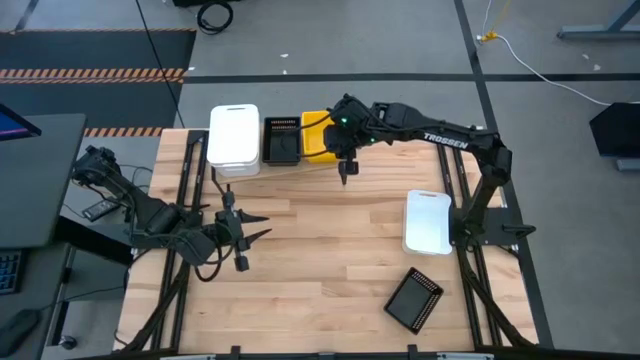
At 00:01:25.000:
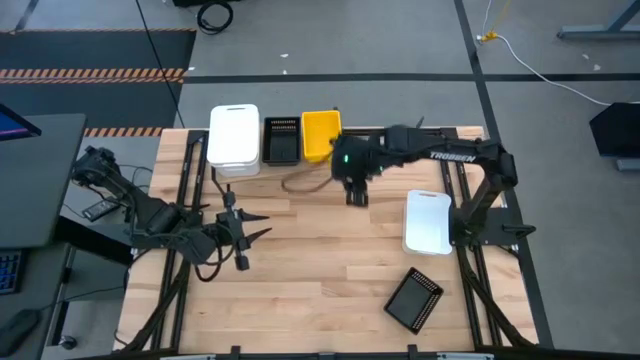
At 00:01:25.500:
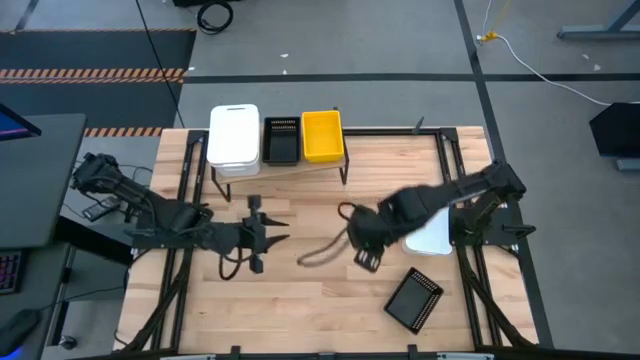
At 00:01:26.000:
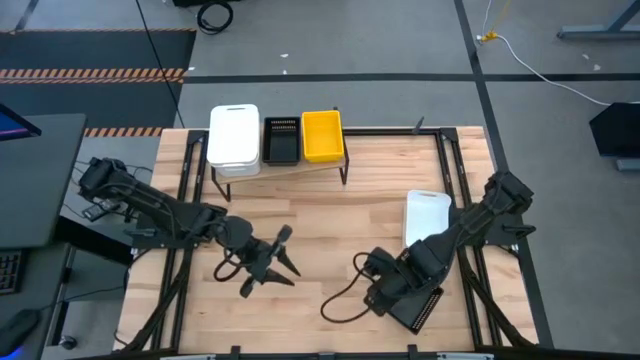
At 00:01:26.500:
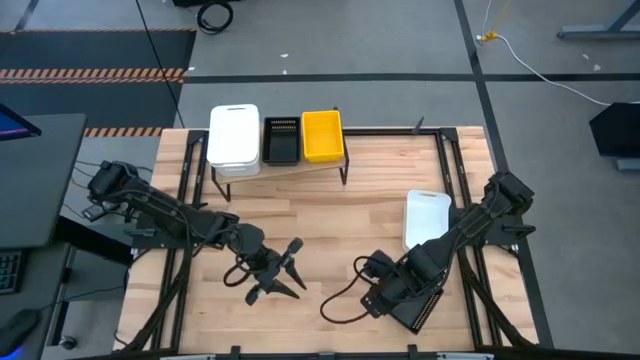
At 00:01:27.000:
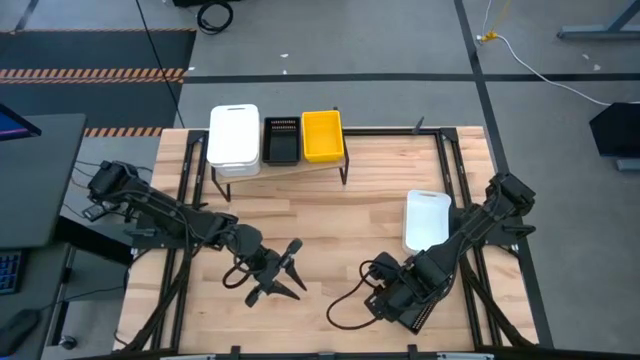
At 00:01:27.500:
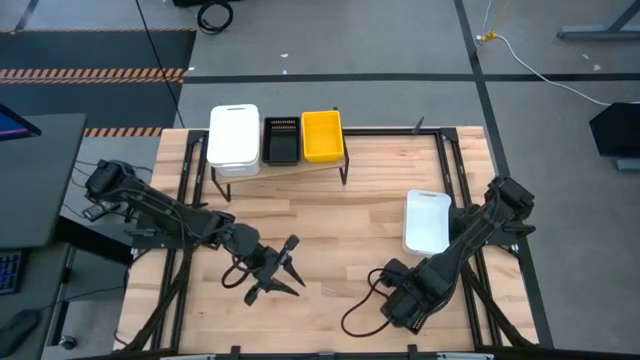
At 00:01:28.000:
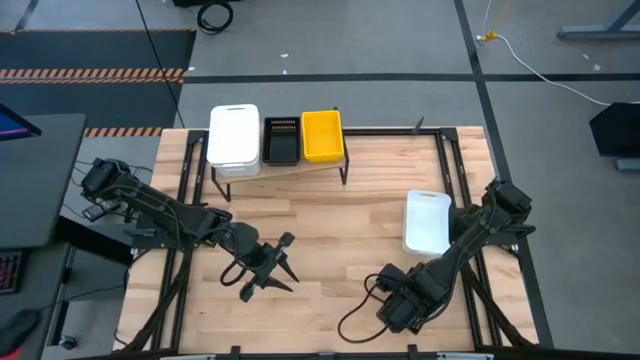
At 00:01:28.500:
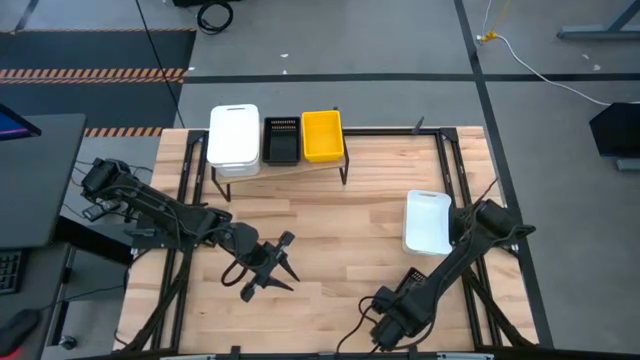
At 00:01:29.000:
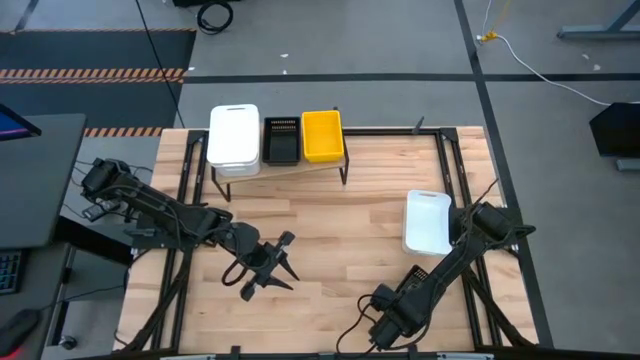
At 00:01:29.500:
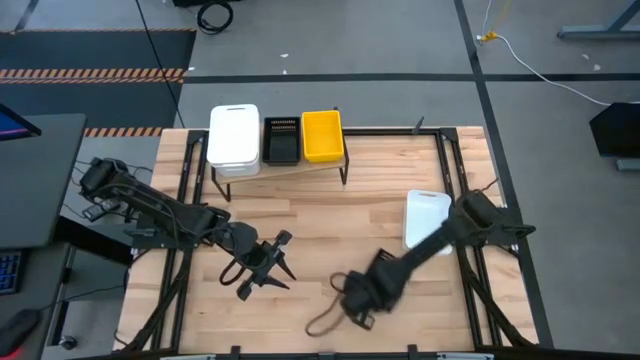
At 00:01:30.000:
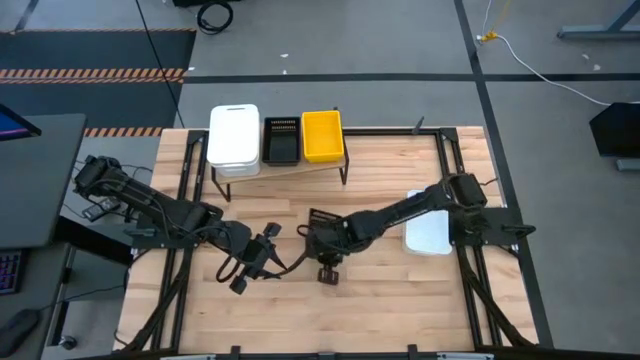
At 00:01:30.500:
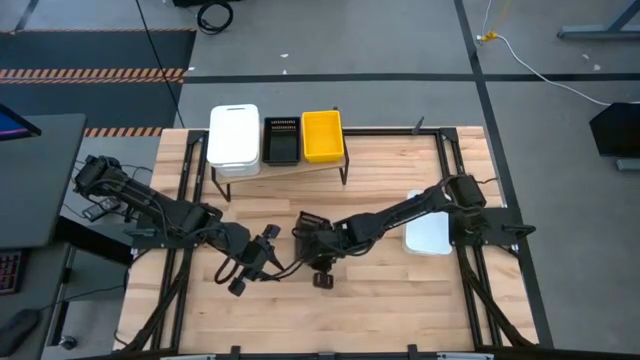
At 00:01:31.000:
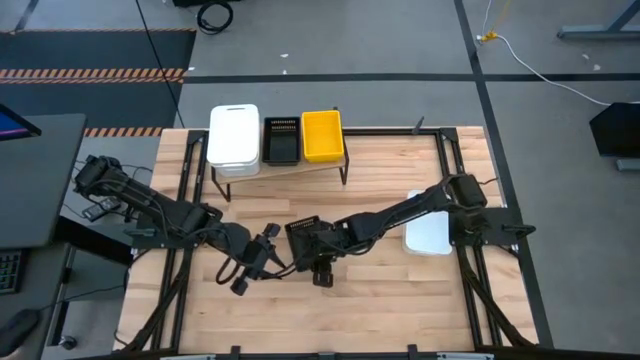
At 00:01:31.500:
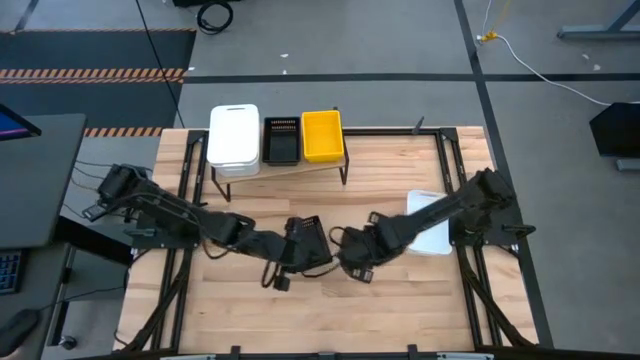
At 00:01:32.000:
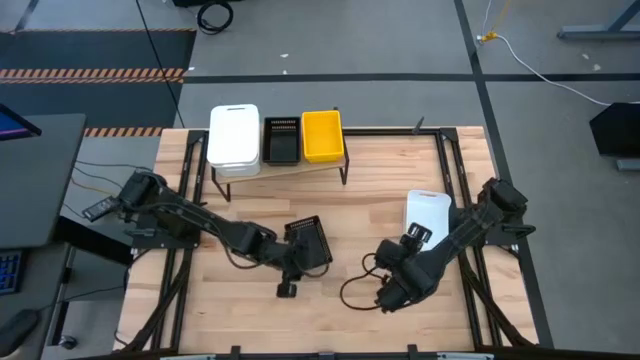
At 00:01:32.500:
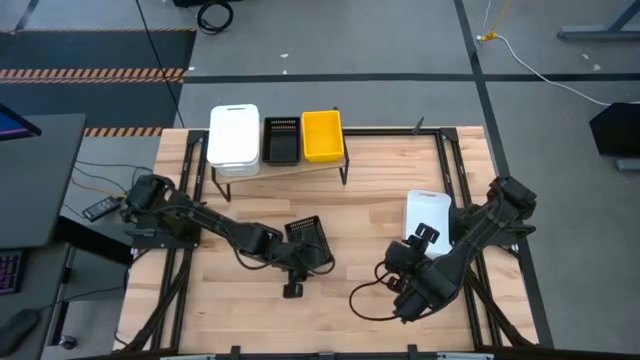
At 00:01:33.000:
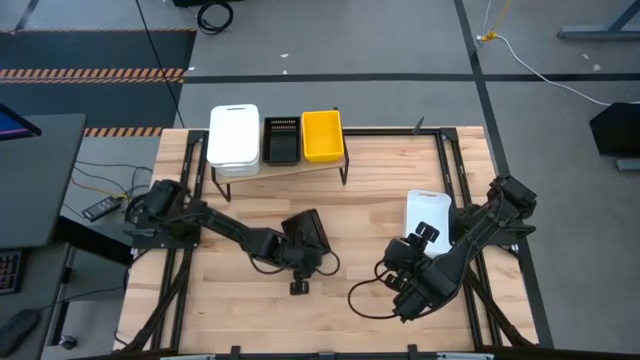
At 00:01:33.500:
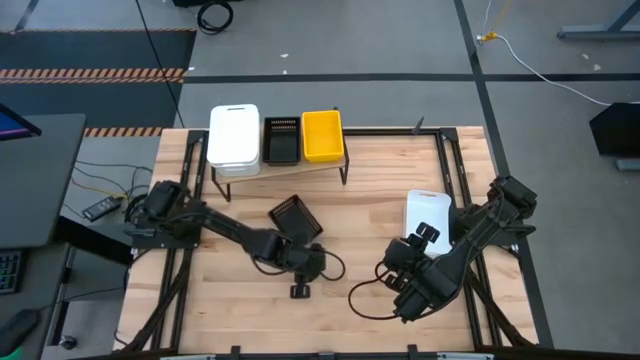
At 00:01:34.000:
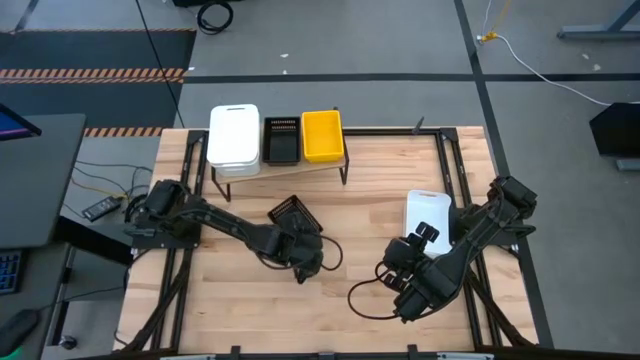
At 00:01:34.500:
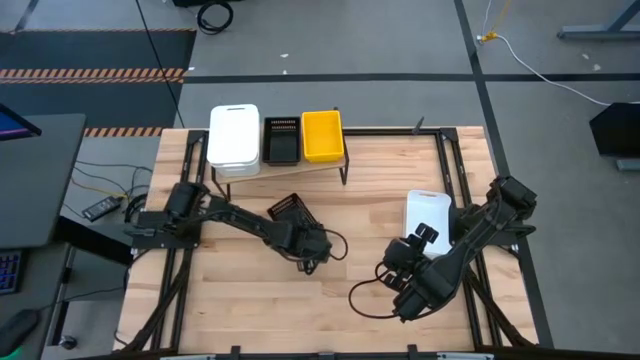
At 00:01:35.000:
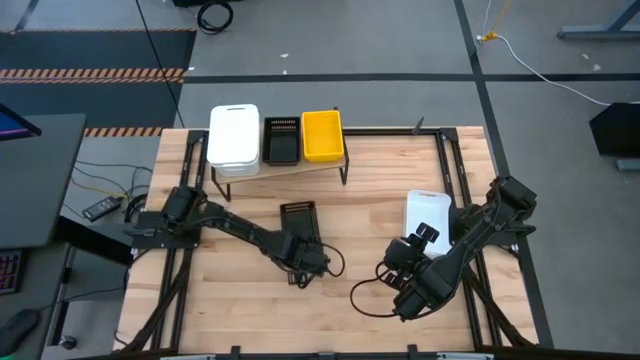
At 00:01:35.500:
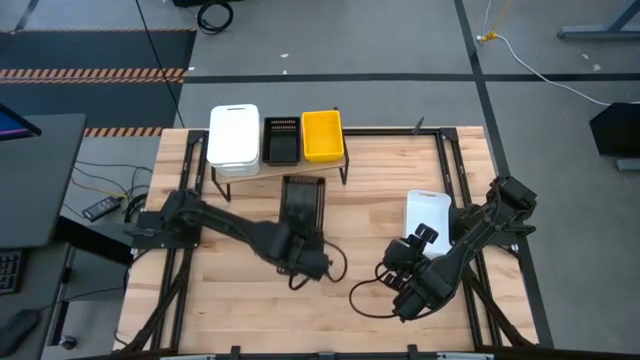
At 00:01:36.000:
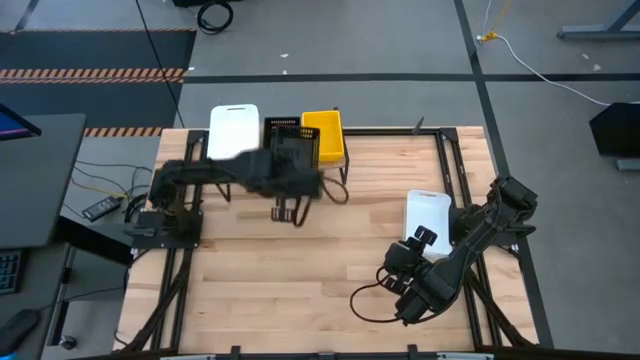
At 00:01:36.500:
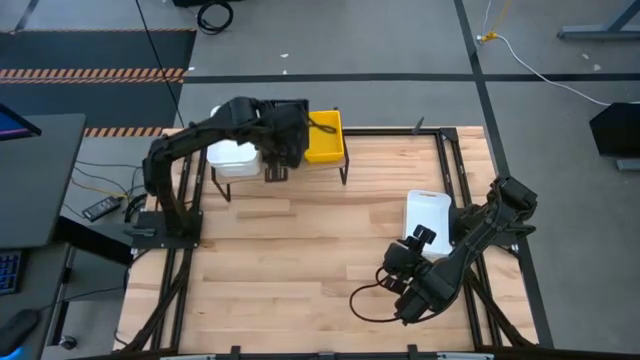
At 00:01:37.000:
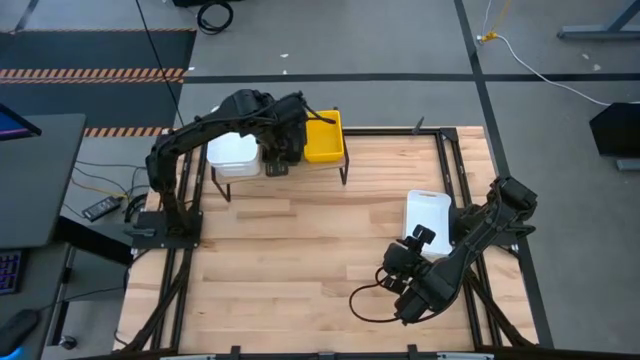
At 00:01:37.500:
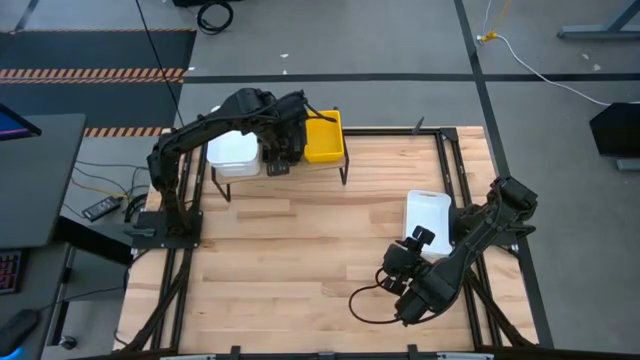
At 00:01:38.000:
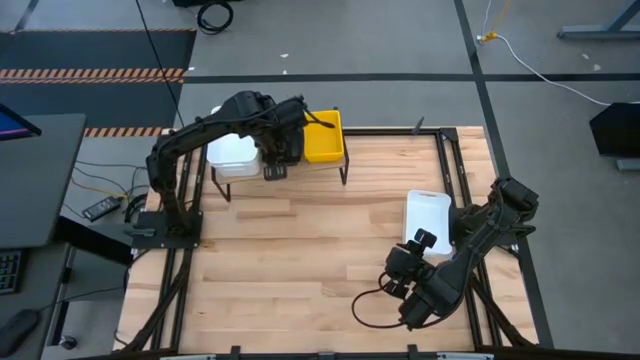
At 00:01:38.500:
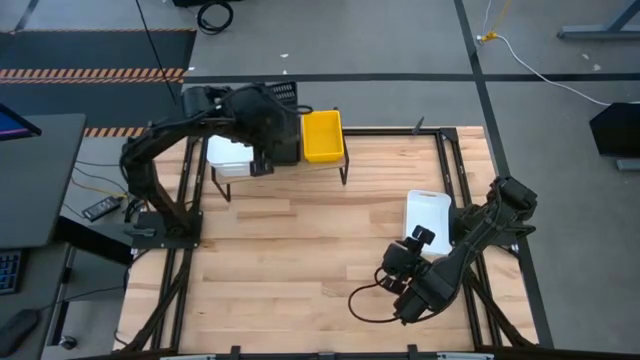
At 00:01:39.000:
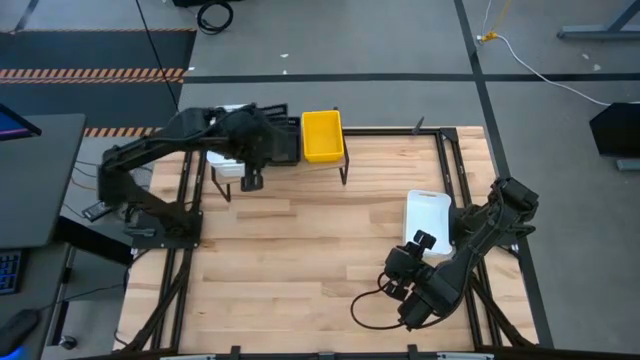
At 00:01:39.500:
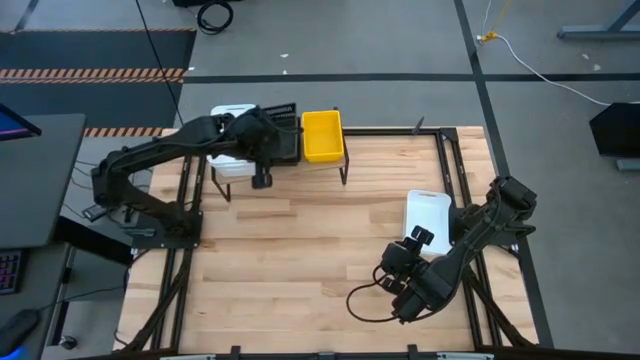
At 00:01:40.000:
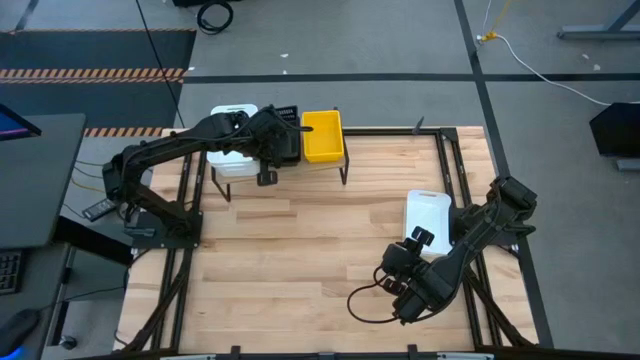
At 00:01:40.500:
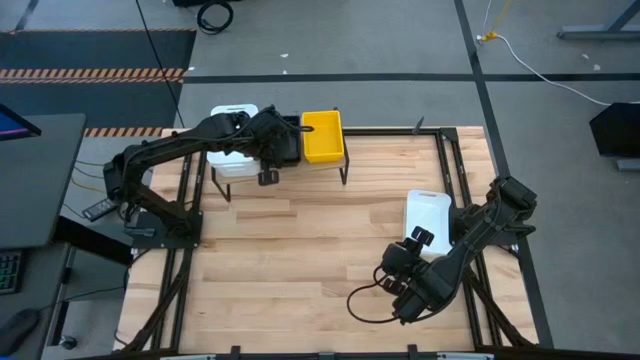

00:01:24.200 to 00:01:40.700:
Task: Stack baskets on shelf by color
Stack the black bin on top of the other black bin on the shelf
